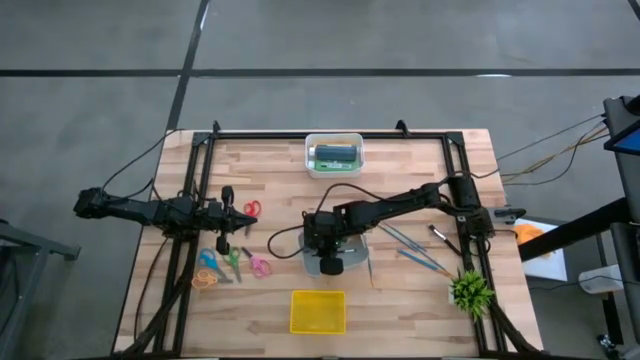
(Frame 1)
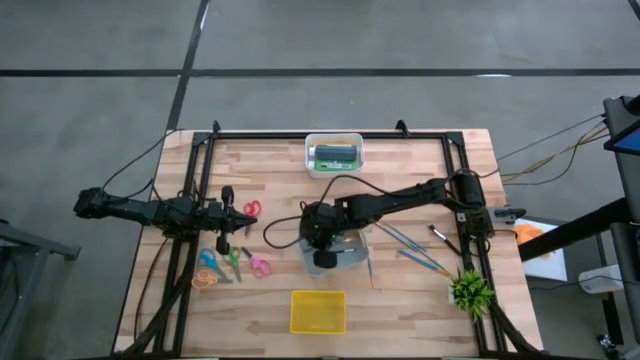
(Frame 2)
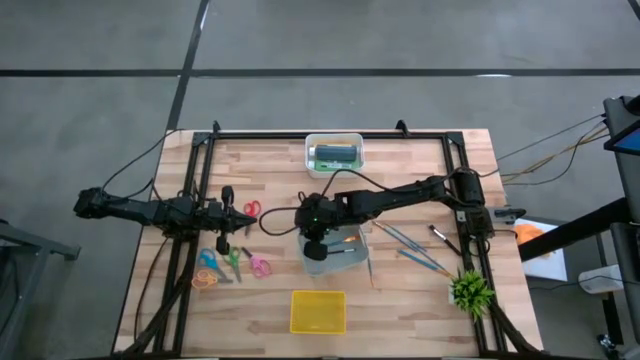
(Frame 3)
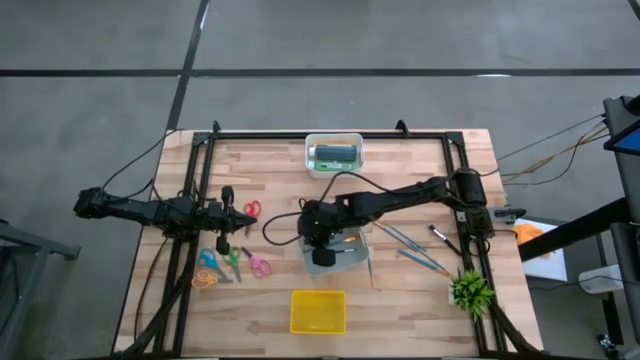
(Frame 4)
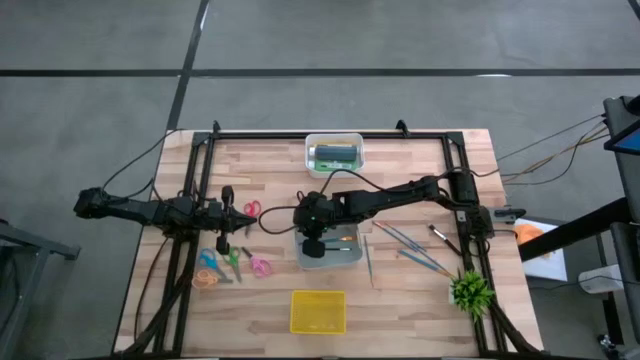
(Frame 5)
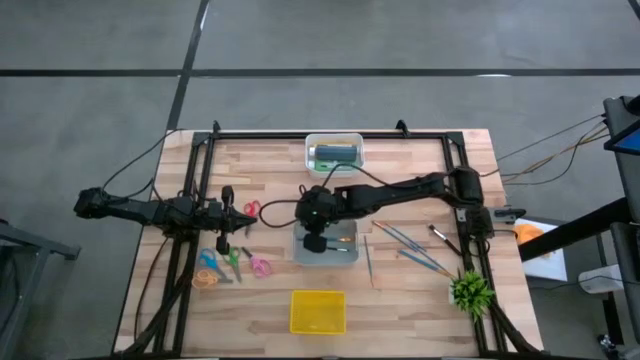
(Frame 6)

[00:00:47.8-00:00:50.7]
Task: Pick & Place Paint Supplies
Adjust the gray bin on the table

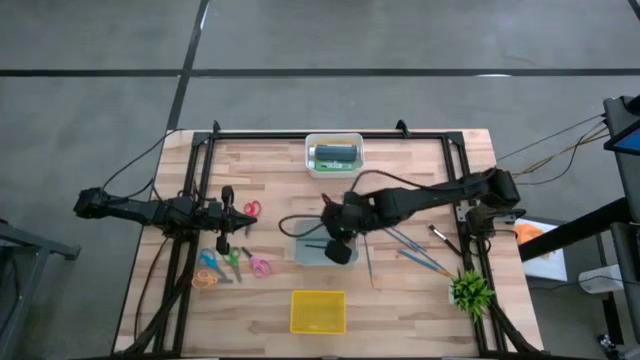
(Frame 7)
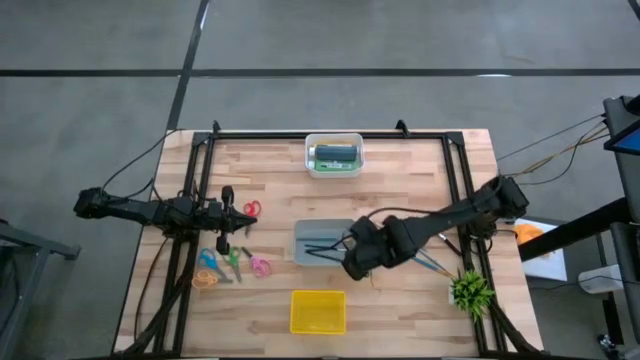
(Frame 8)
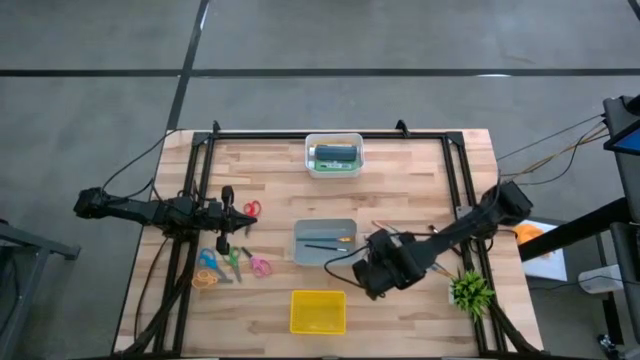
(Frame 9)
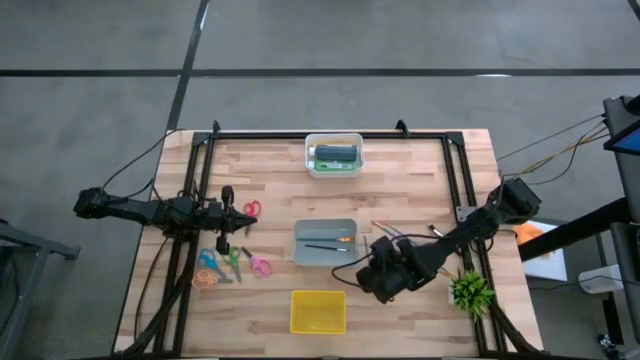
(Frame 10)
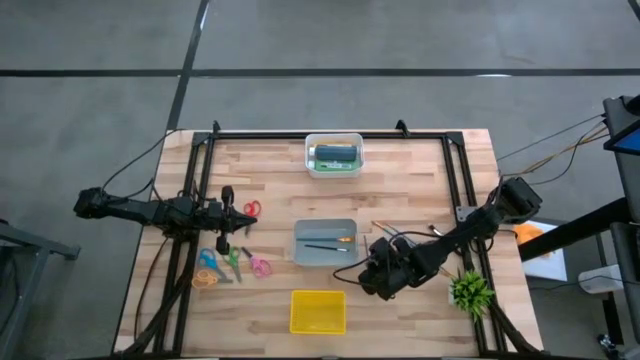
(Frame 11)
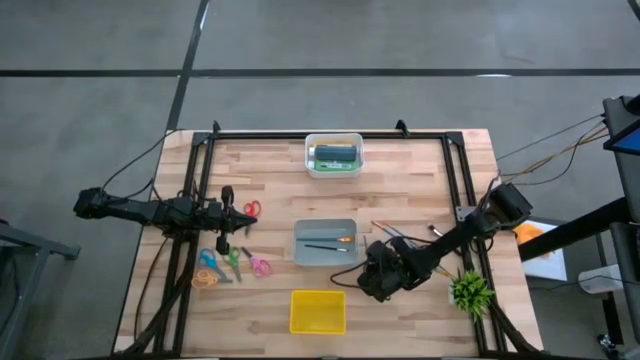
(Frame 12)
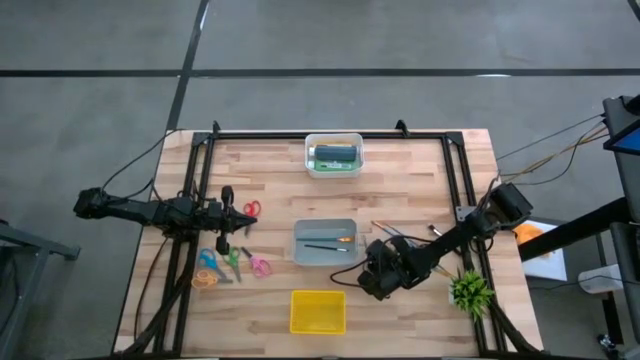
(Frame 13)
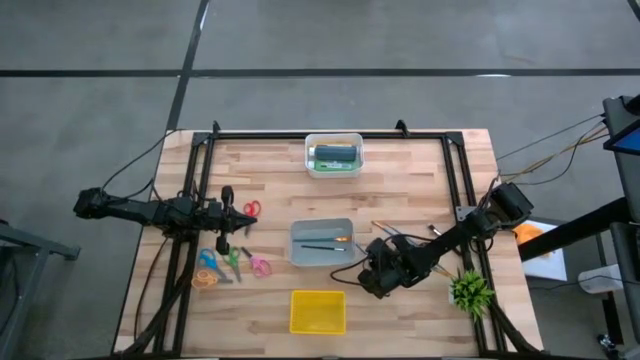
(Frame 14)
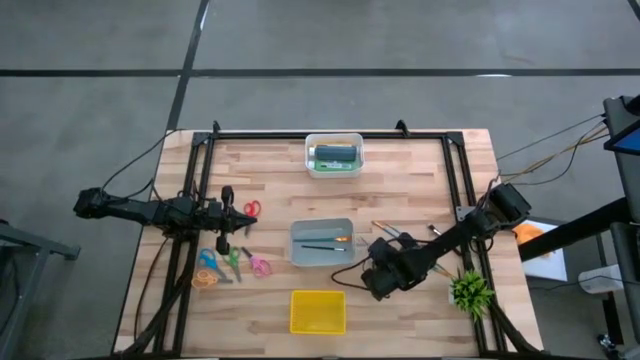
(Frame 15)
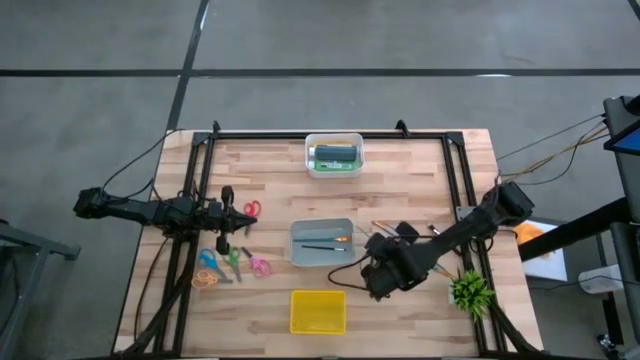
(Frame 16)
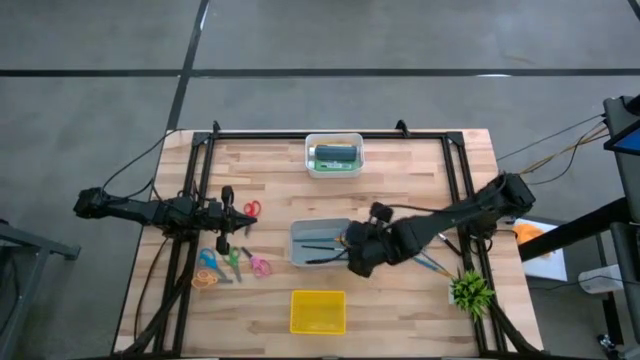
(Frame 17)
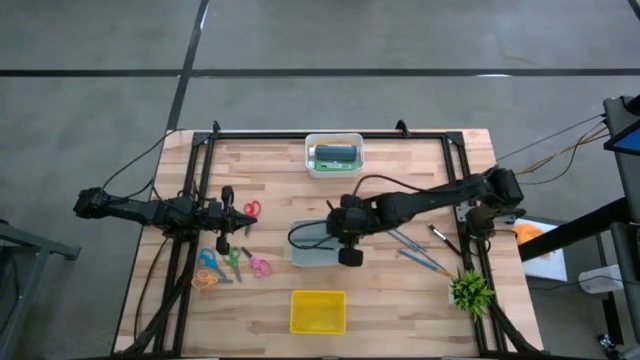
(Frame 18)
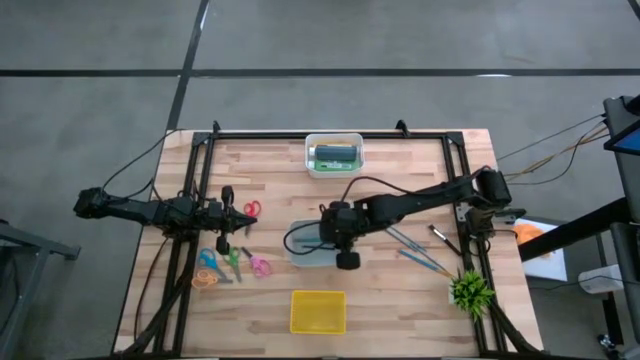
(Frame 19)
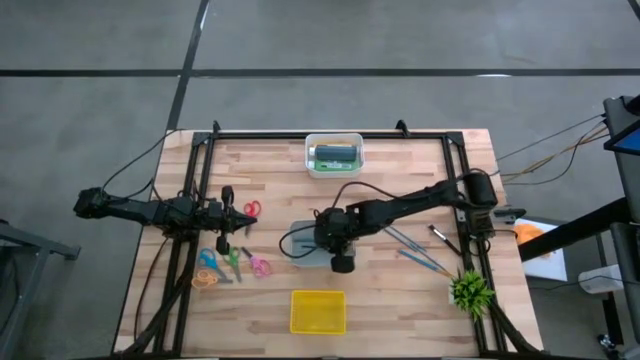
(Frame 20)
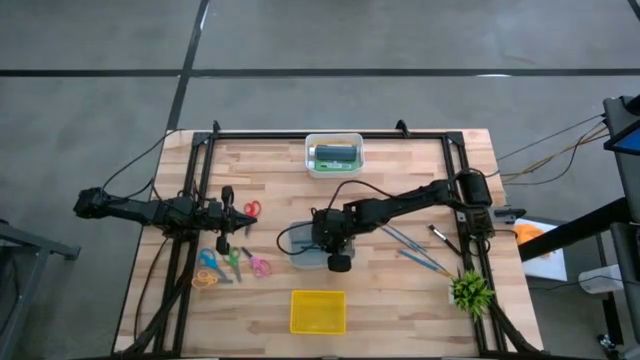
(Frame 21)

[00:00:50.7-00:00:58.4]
Put the blue paint brush into the gray bin

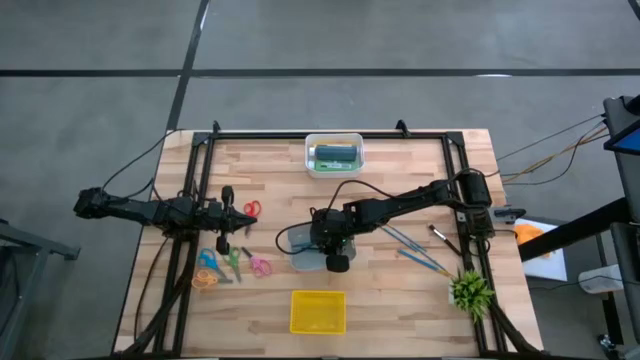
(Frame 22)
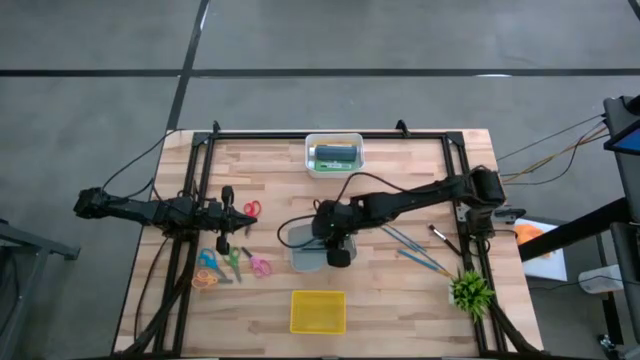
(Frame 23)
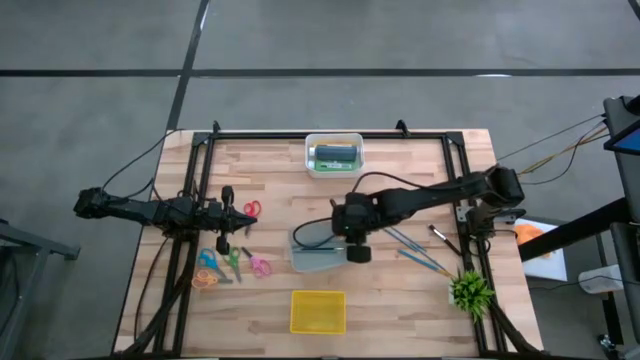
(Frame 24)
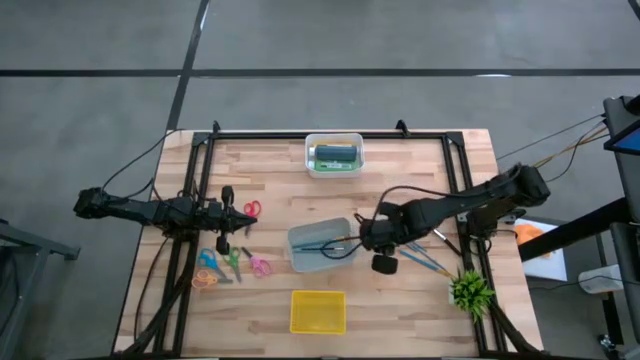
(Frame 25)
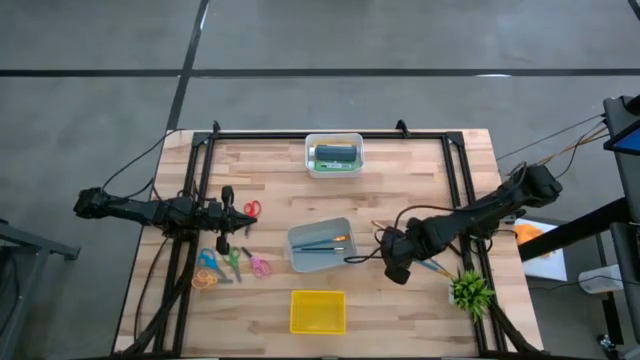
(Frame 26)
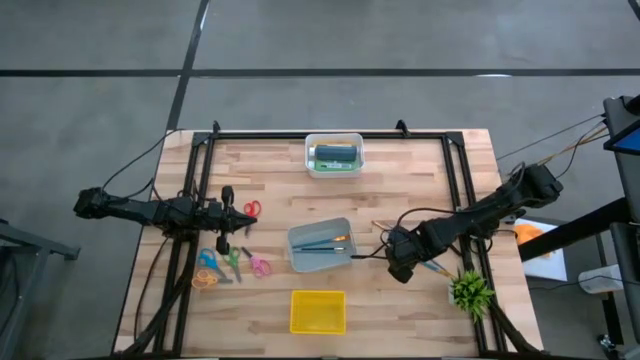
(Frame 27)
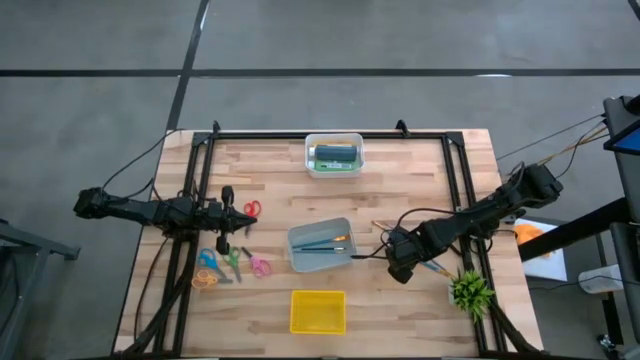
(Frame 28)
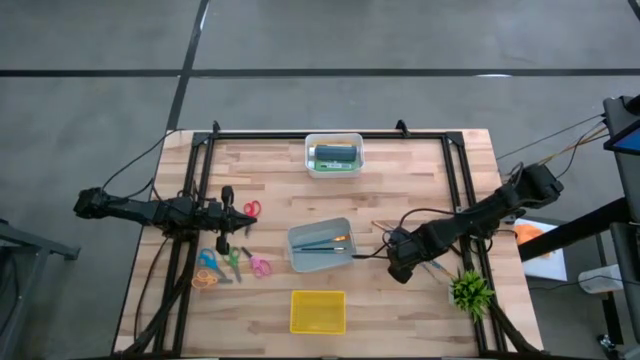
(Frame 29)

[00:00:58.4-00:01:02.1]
Put the blue paint brush into the gray bin

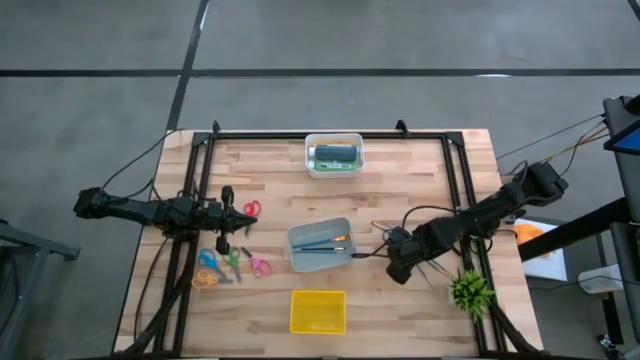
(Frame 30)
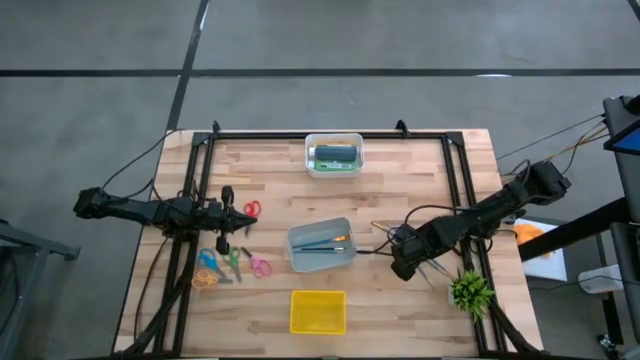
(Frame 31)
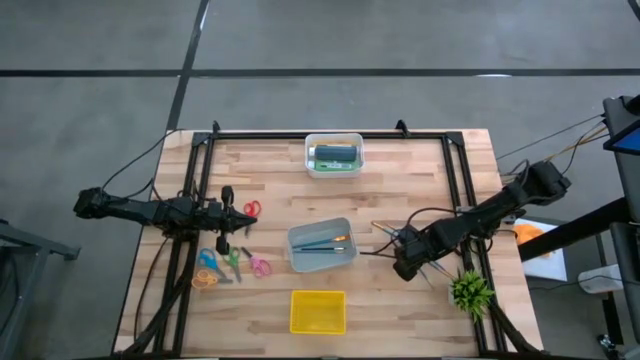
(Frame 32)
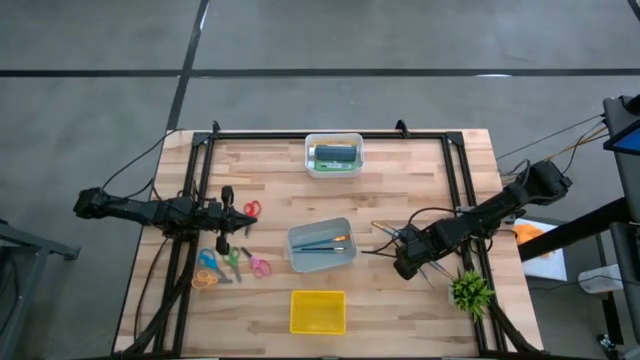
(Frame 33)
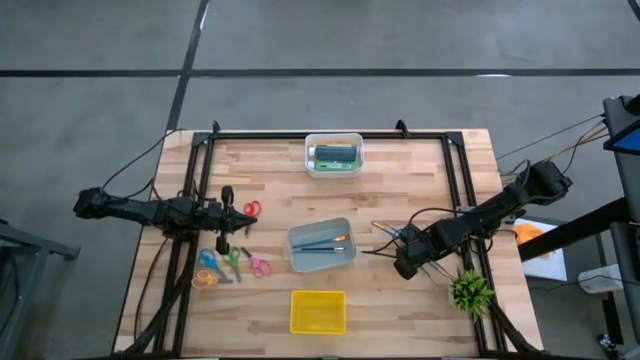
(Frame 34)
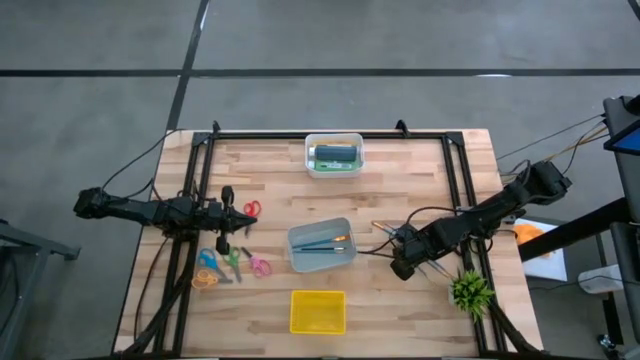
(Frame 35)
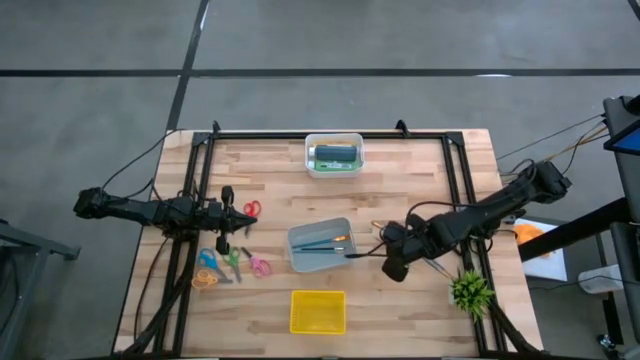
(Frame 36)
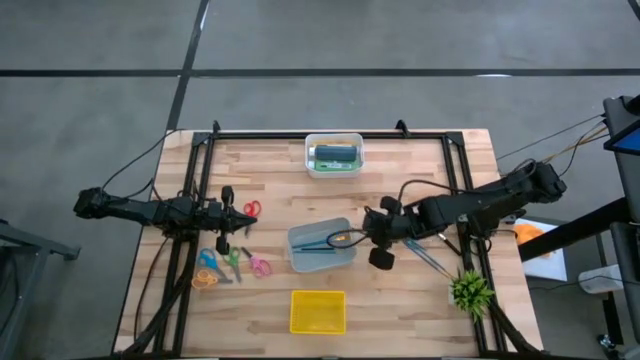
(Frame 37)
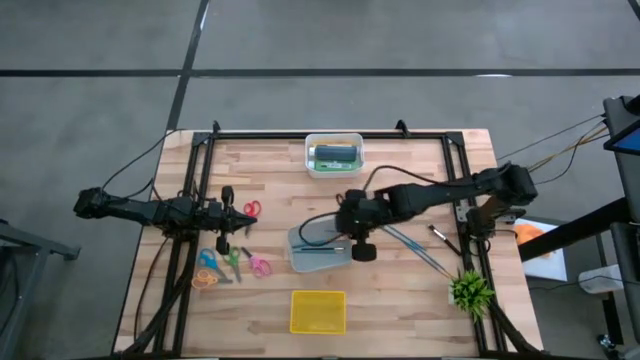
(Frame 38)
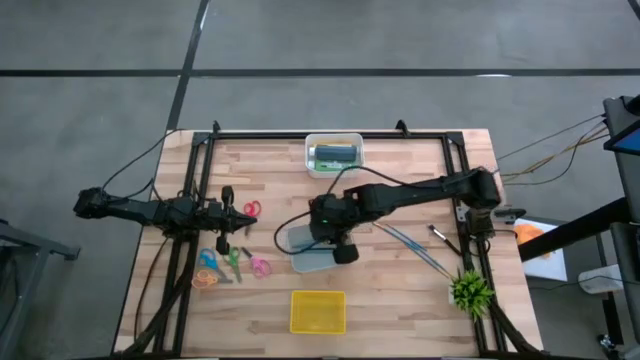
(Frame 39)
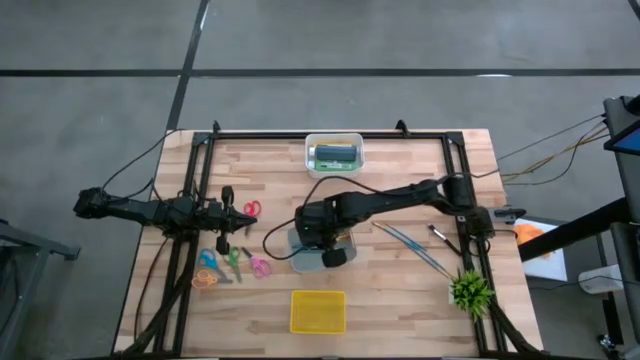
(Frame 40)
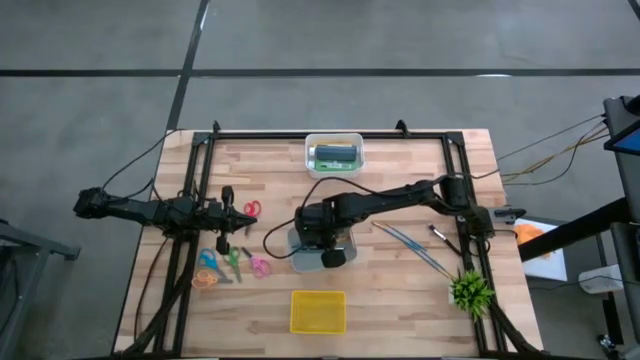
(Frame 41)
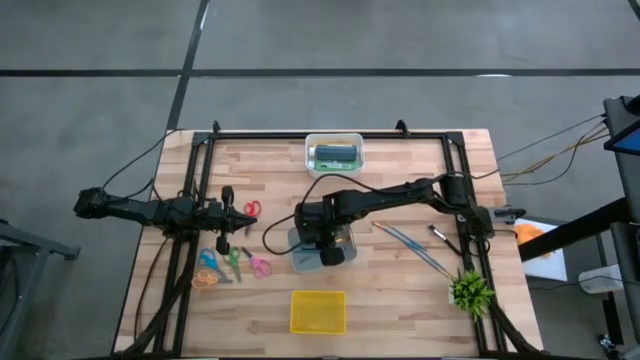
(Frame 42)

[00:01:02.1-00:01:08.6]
Put the blue paint brush into the gray bin

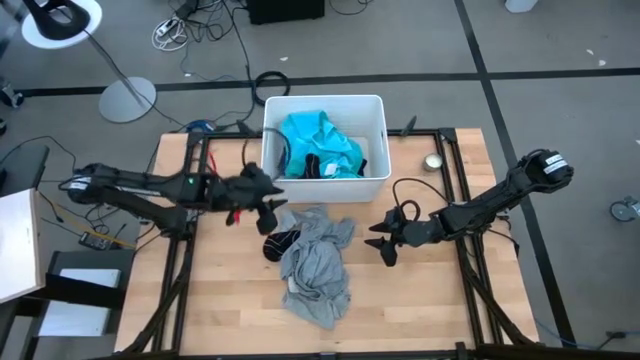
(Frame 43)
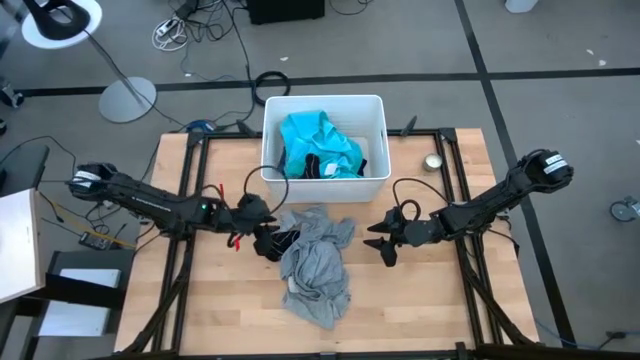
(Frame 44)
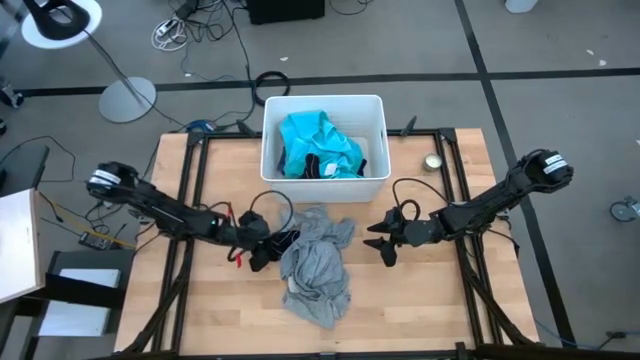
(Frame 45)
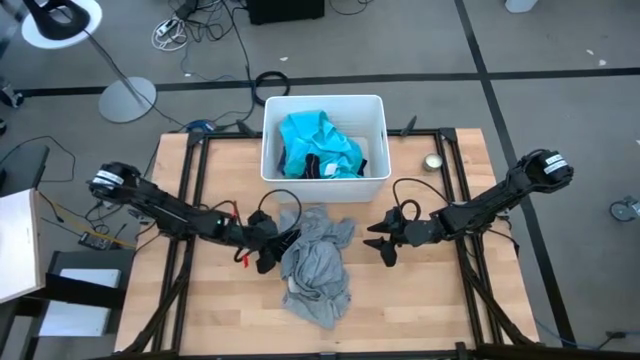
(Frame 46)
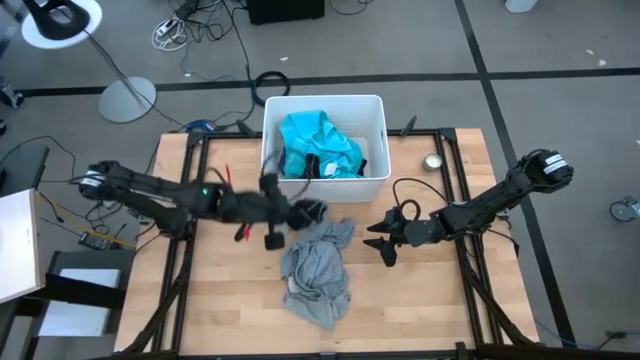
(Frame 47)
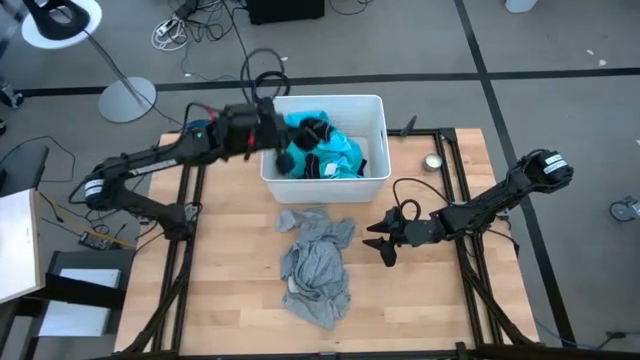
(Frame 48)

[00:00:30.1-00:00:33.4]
Task: Sort clothes
Put the black sock into the white bin
